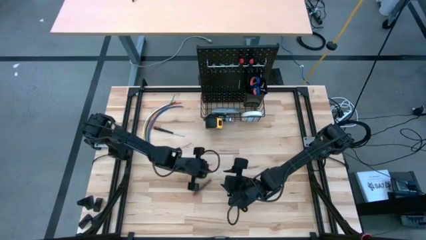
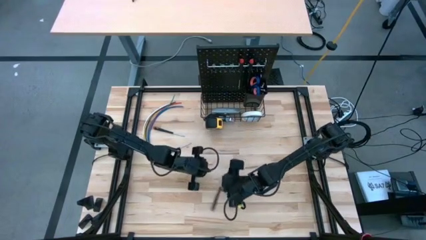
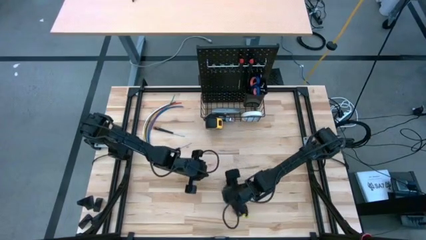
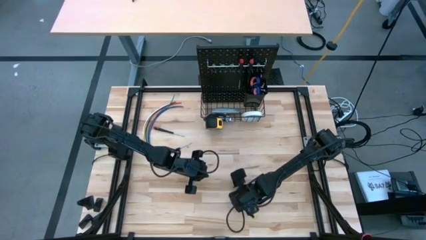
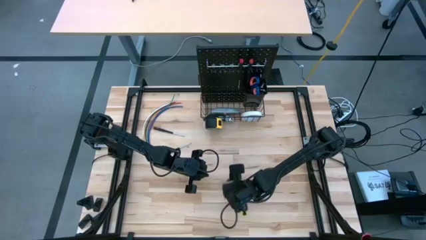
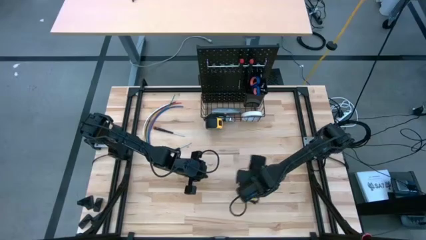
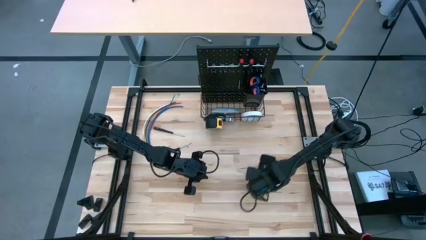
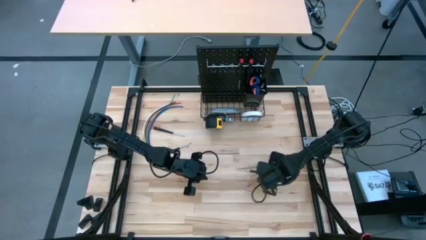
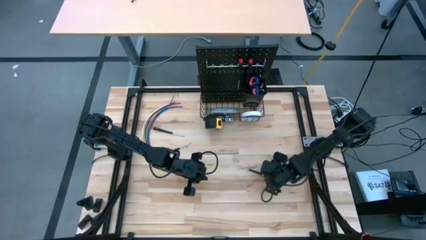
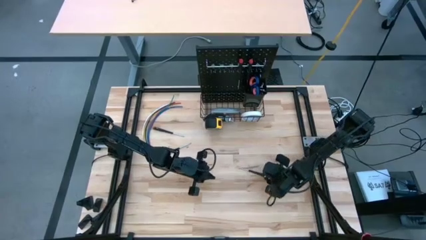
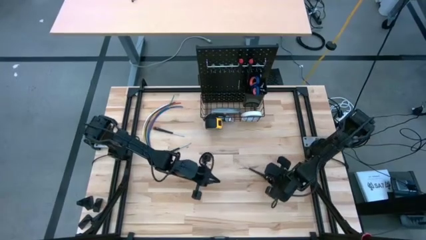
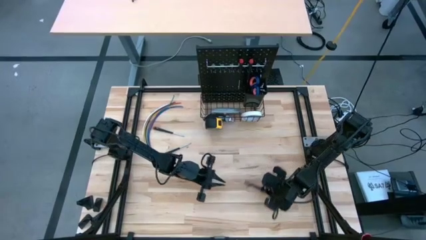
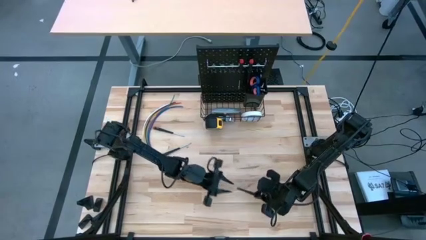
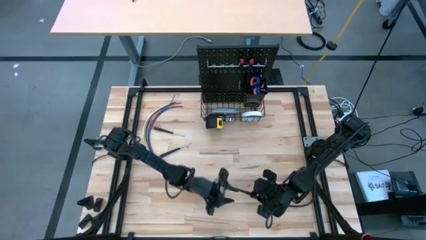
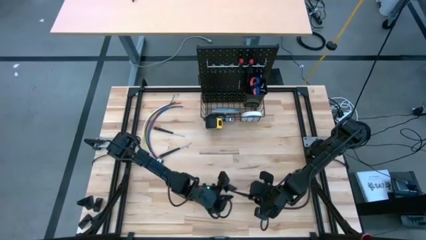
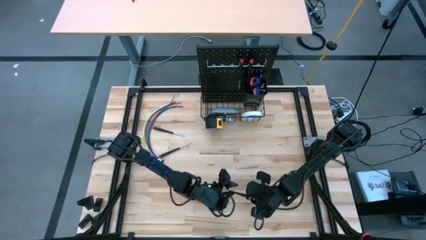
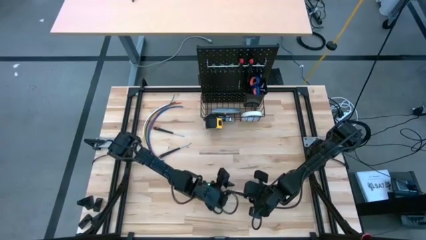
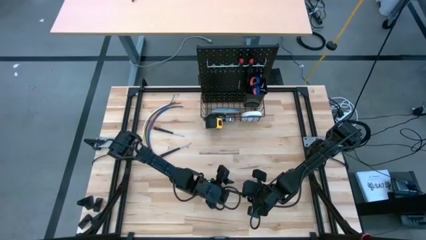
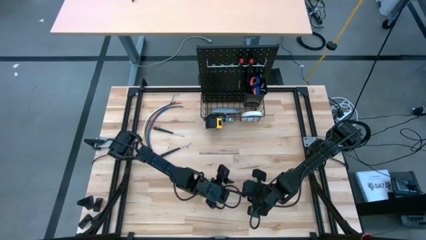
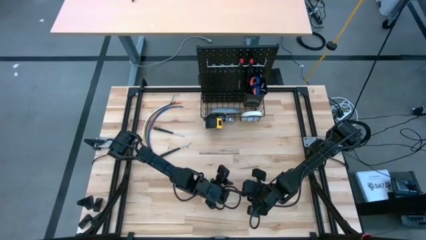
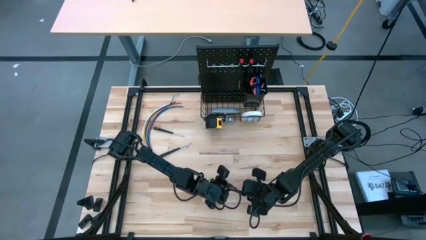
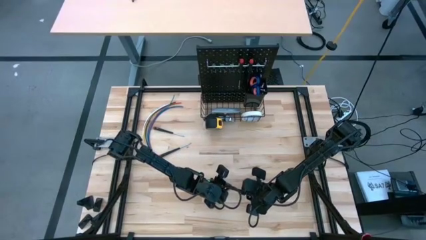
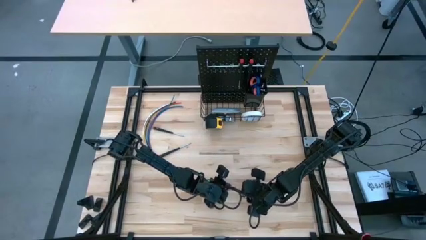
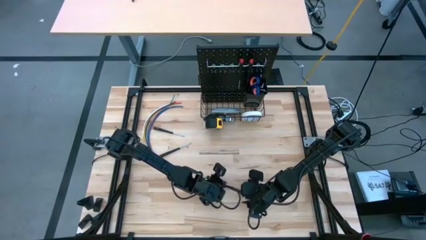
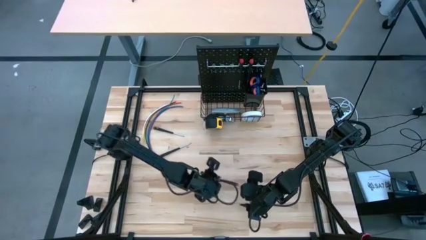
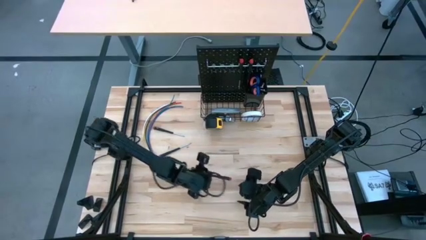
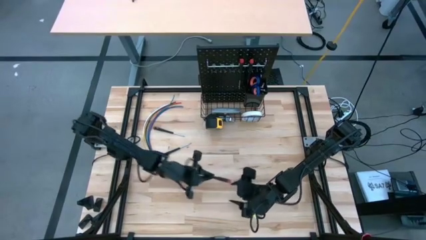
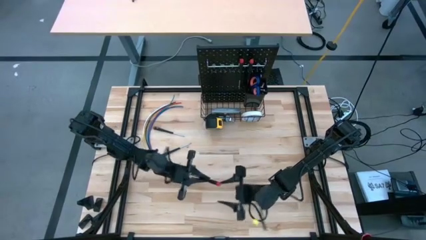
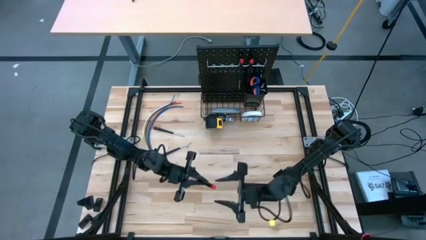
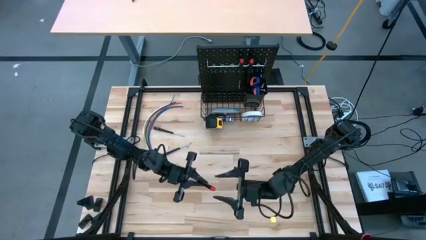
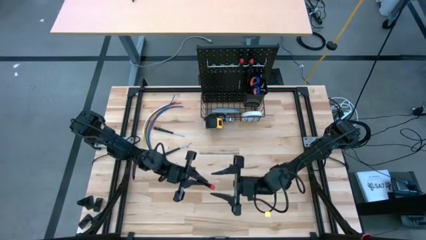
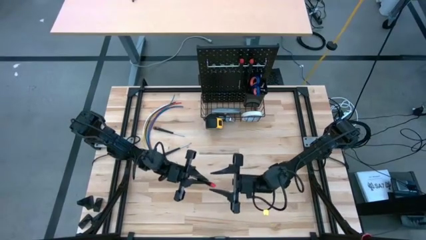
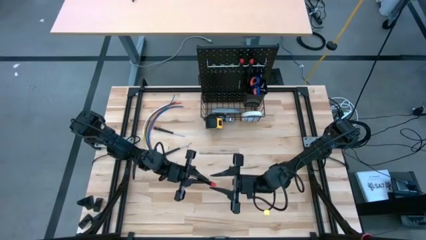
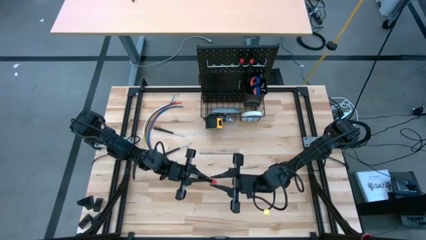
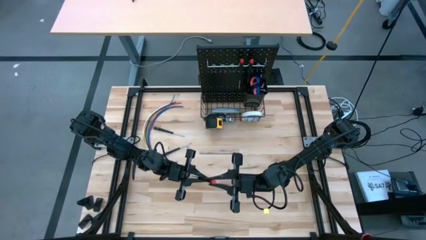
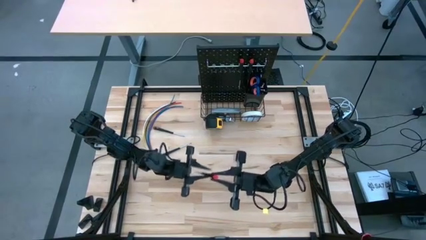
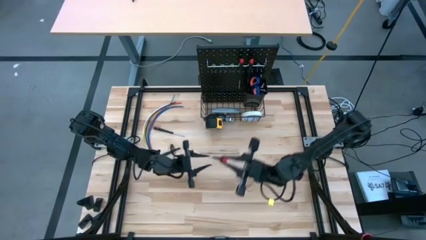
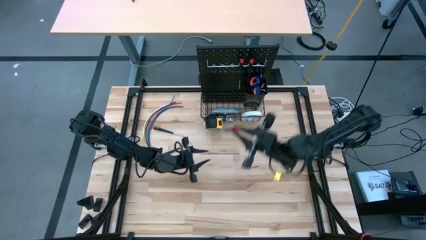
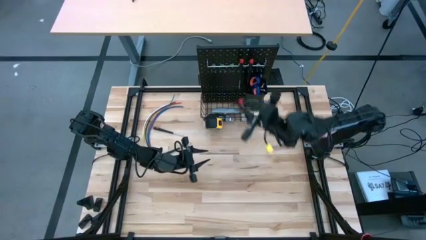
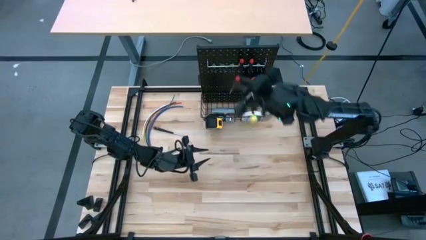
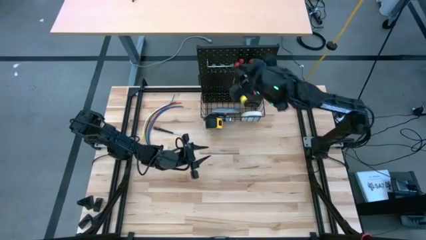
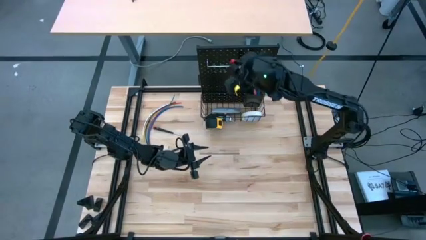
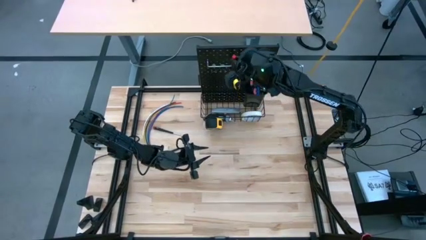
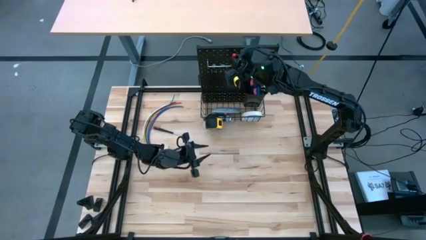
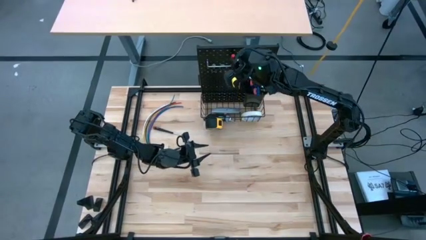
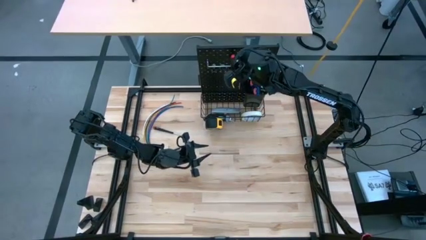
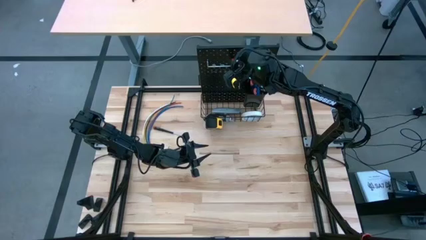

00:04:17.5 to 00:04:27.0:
Task: Hang tools onto peg board
Hang the black screwdriver on the pegboard
